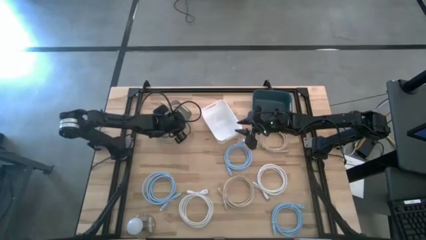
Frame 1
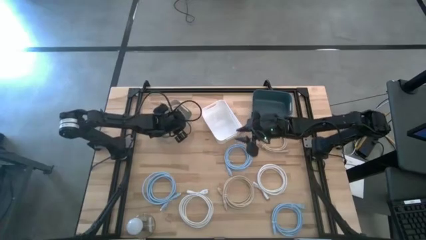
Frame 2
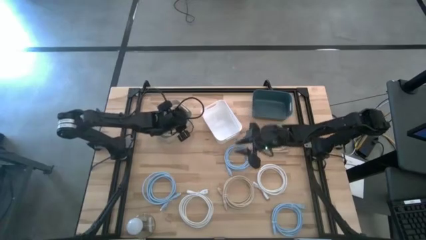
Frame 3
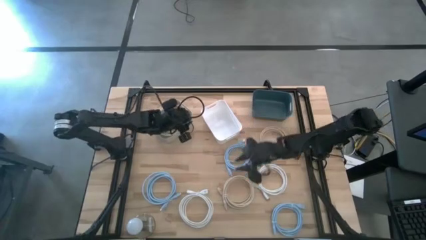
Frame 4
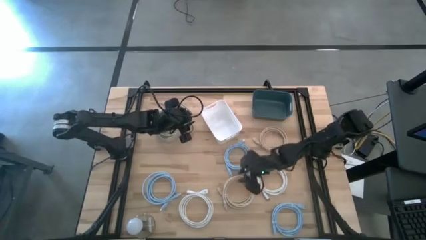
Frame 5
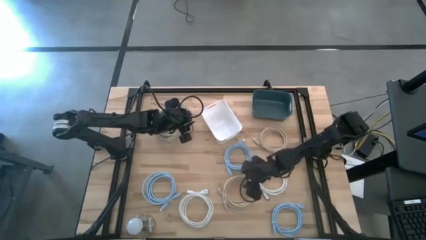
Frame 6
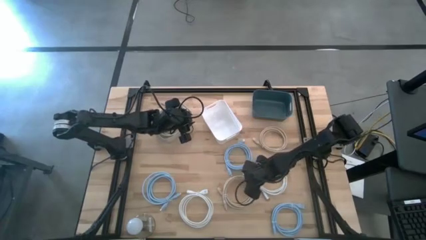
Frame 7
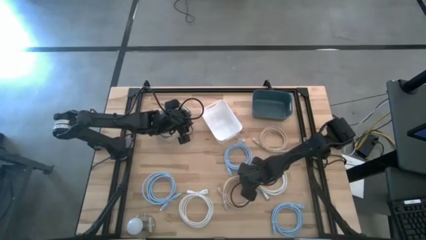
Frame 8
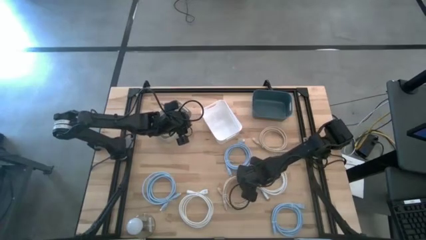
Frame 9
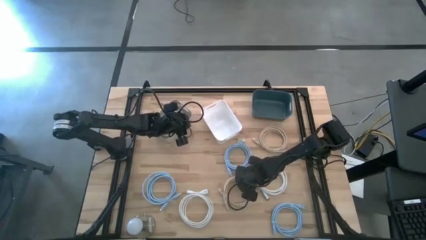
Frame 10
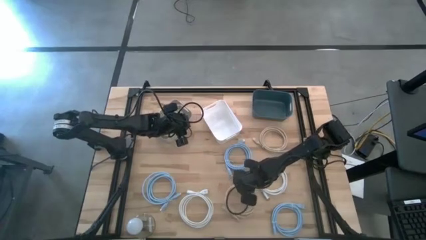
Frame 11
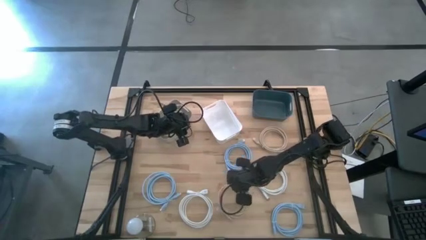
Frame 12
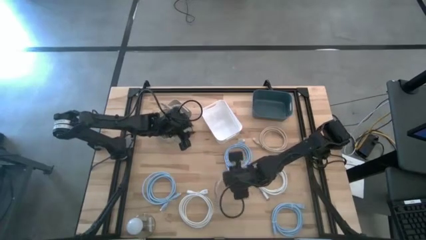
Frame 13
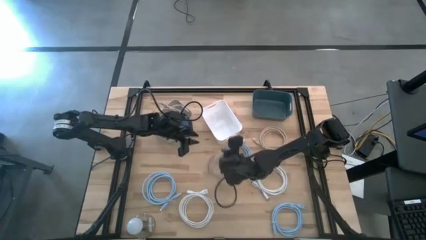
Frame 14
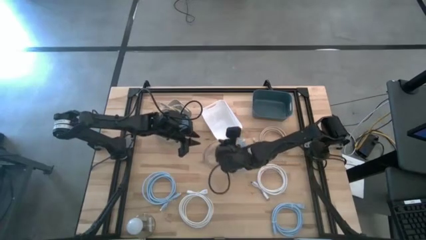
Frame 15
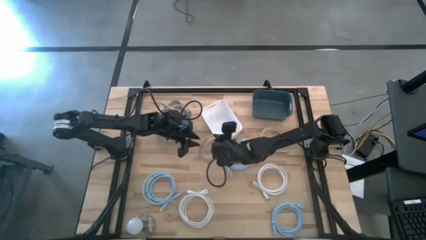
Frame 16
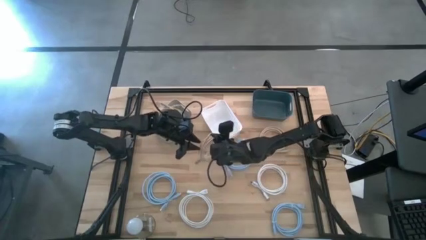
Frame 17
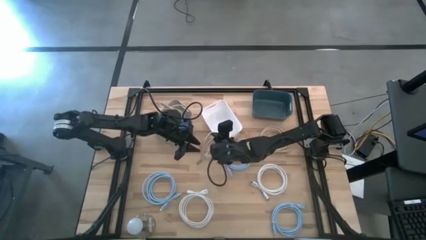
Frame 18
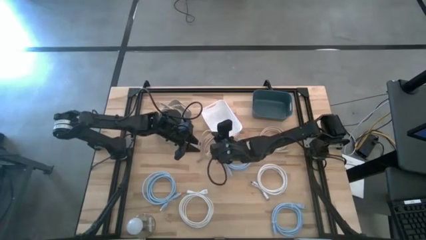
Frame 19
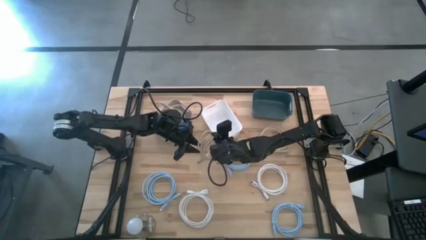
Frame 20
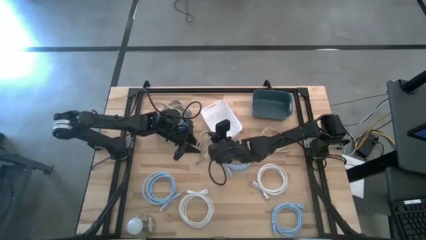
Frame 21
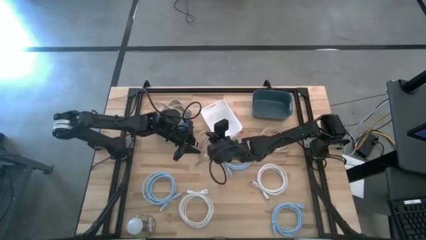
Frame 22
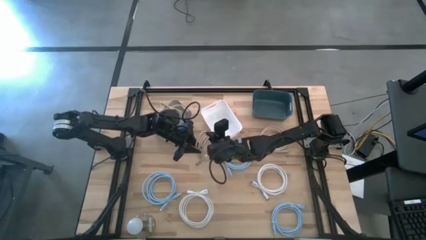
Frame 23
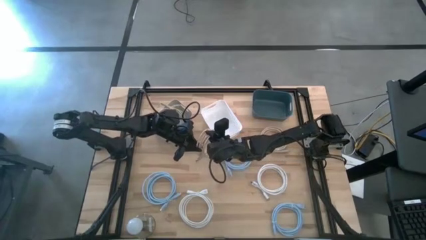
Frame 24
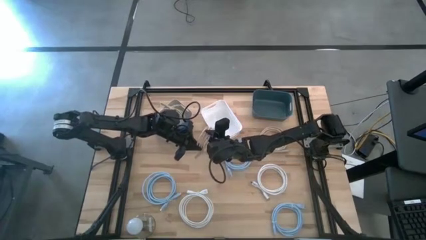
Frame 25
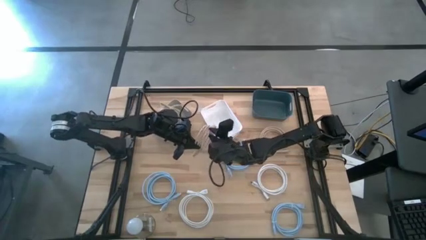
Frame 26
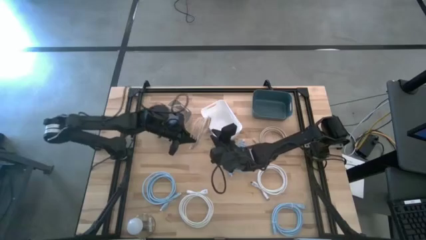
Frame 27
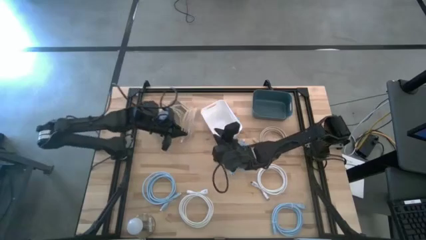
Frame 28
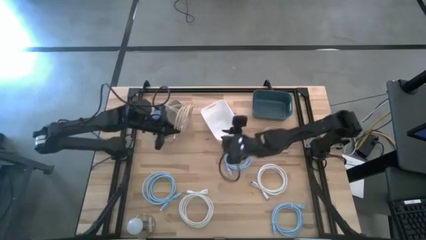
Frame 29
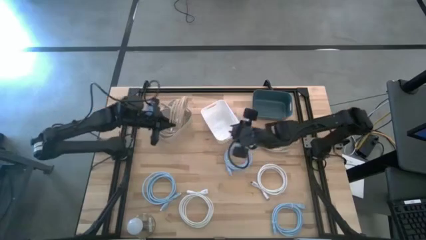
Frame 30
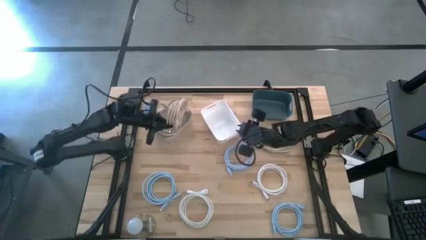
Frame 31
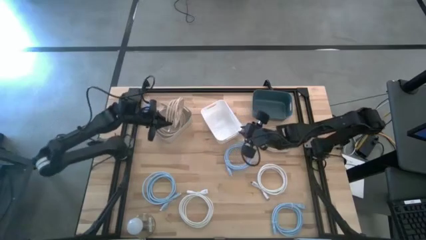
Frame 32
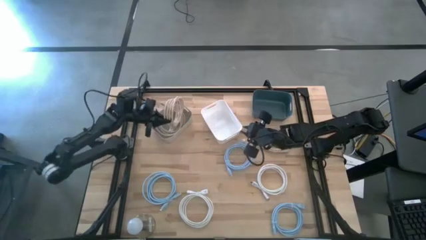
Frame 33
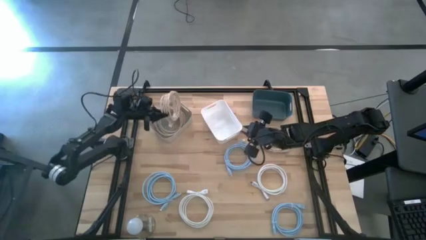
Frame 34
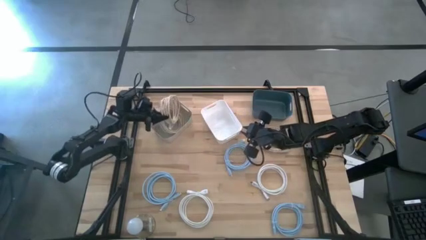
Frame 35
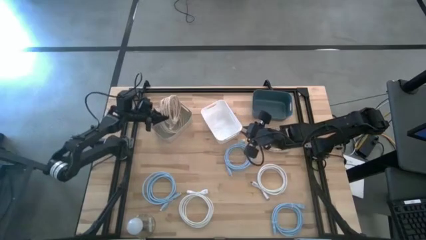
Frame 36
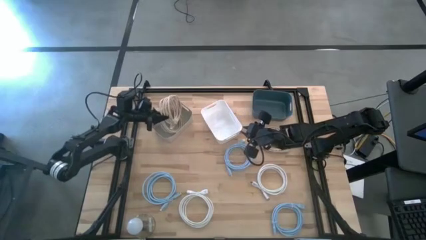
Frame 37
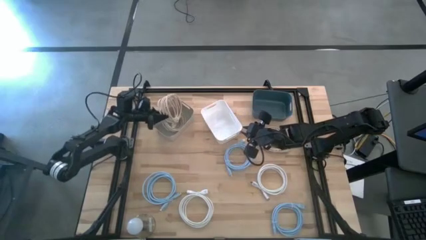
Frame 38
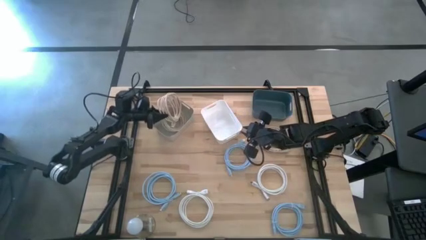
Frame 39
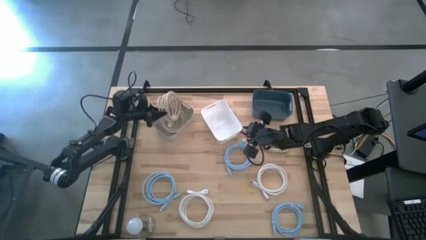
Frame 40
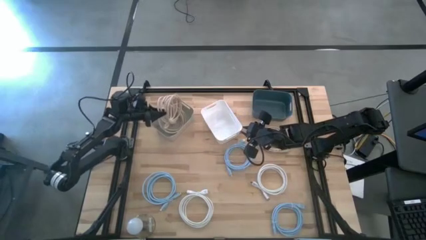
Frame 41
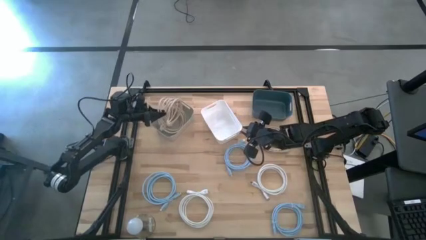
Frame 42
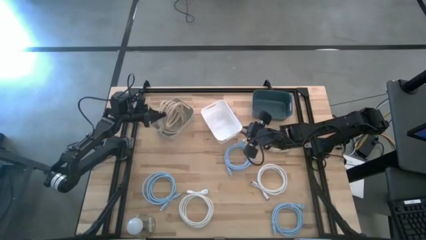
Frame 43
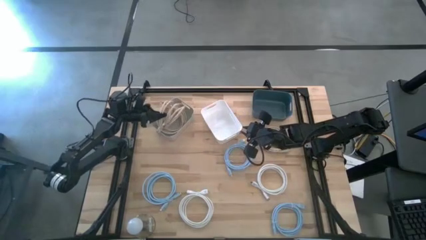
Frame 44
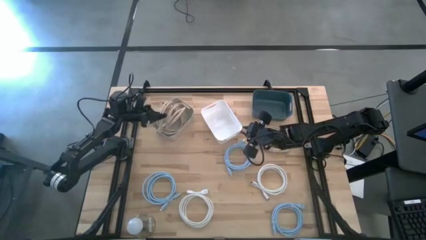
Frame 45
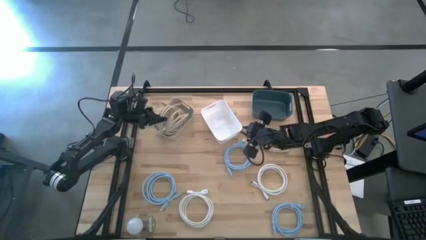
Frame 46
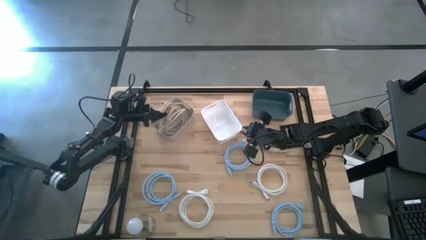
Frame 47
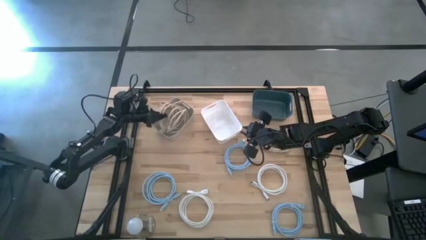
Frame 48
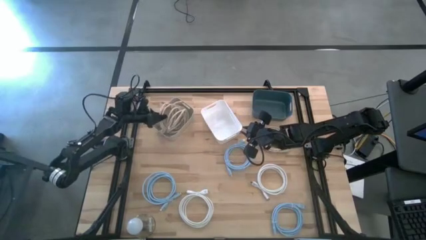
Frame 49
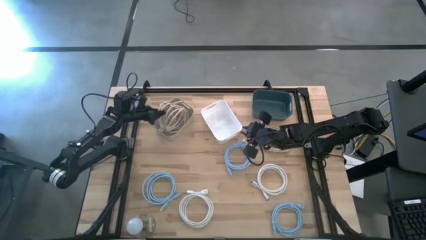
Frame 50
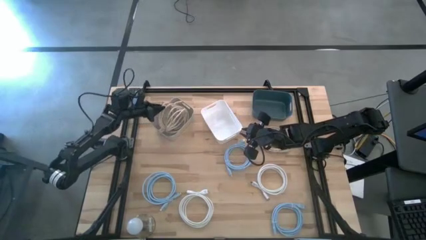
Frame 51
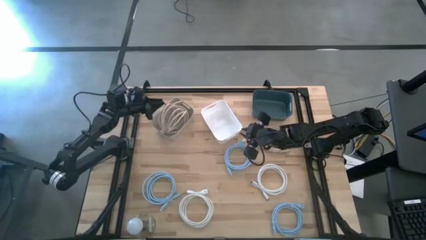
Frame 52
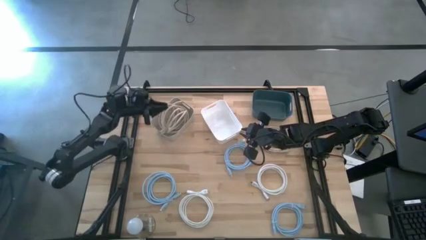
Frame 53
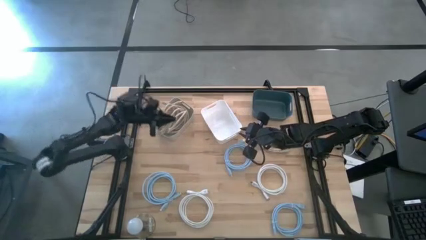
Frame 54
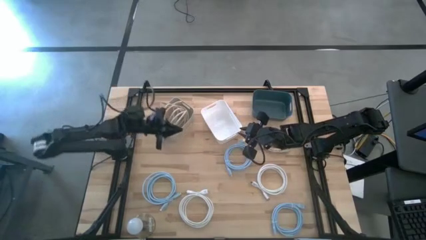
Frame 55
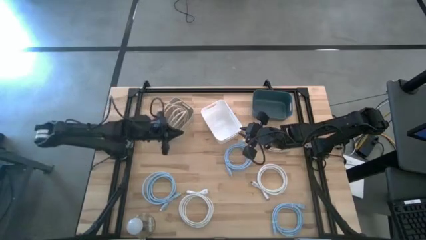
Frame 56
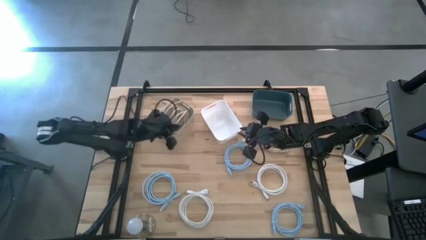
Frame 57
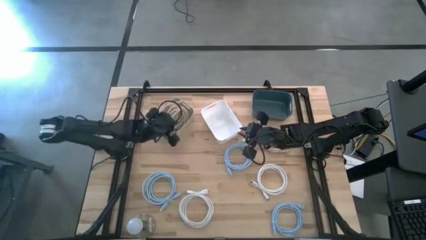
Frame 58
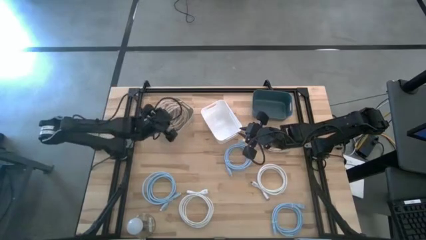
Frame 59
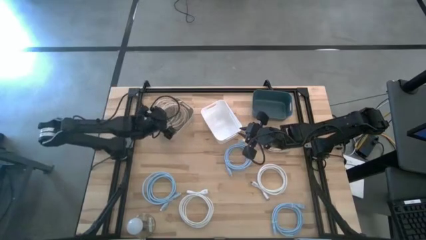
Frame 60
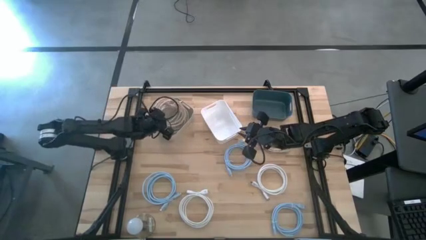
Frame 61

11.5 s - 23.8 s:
Task: Sort HDMI cables
Put the bottom light brown hdmi cable into the gray bin
